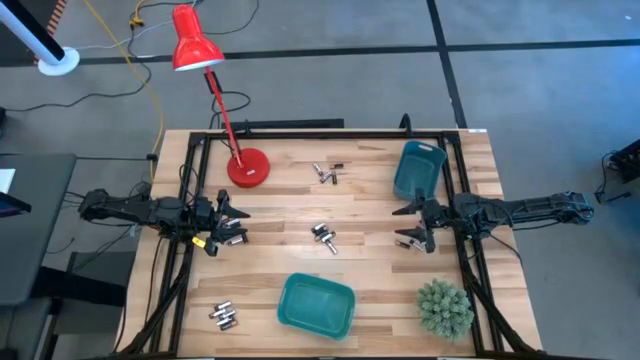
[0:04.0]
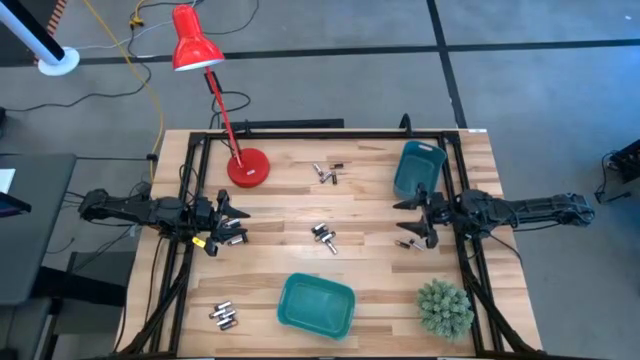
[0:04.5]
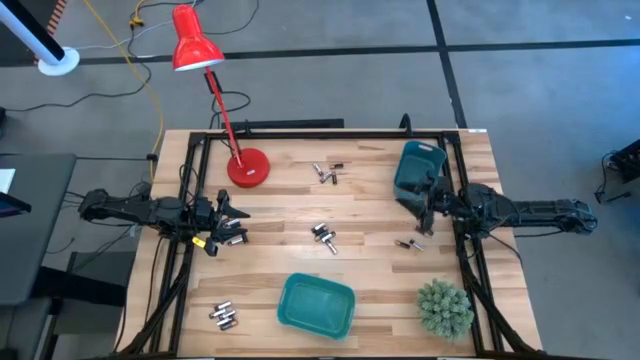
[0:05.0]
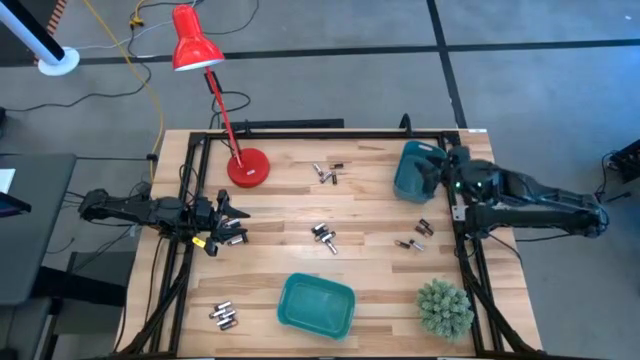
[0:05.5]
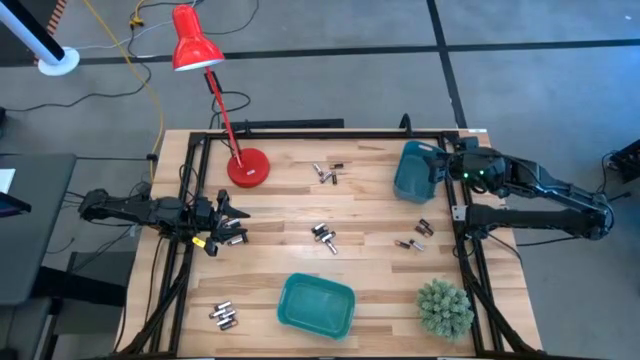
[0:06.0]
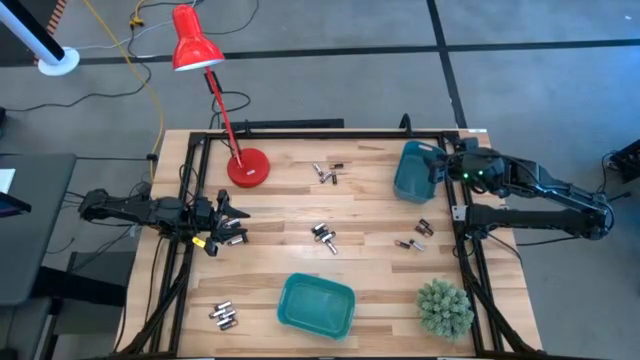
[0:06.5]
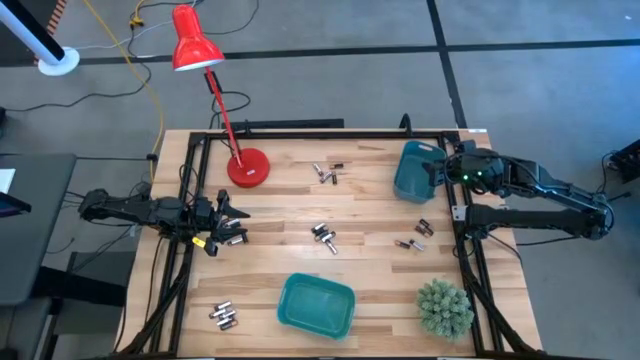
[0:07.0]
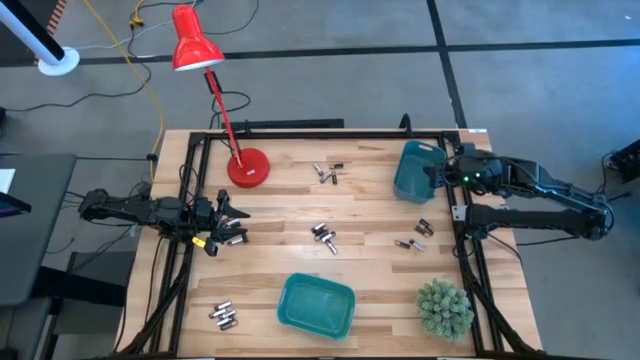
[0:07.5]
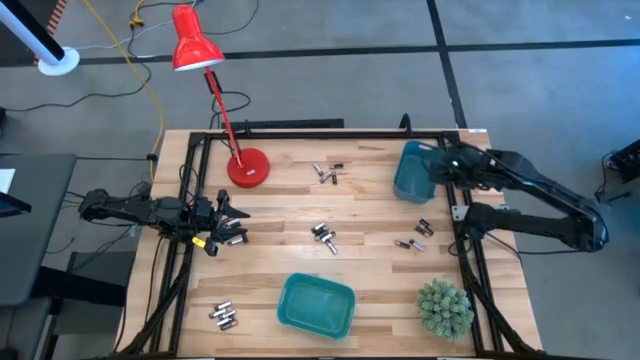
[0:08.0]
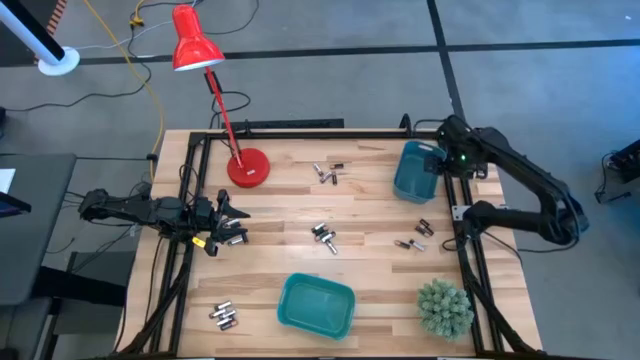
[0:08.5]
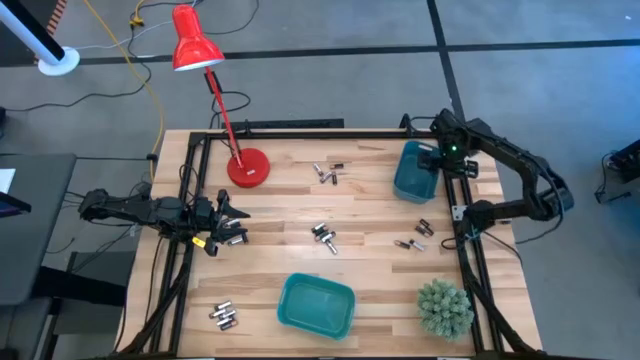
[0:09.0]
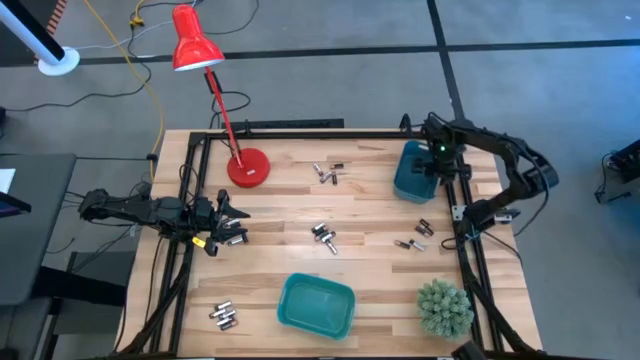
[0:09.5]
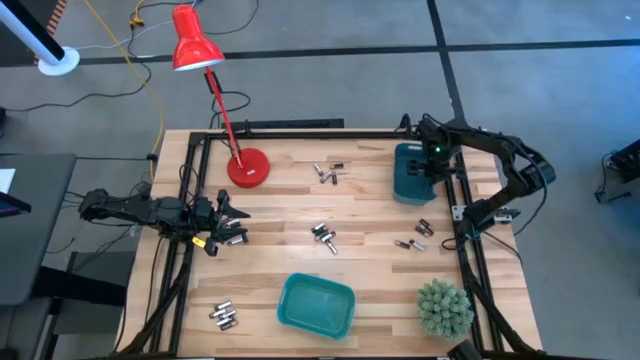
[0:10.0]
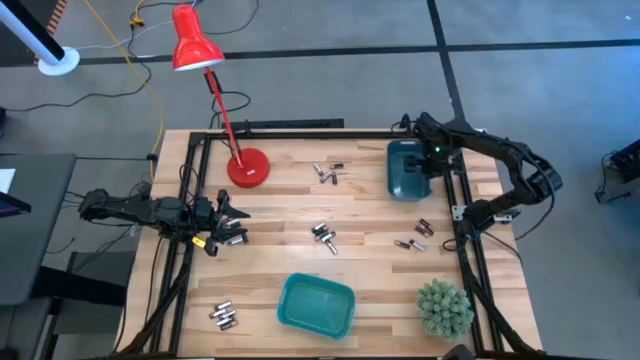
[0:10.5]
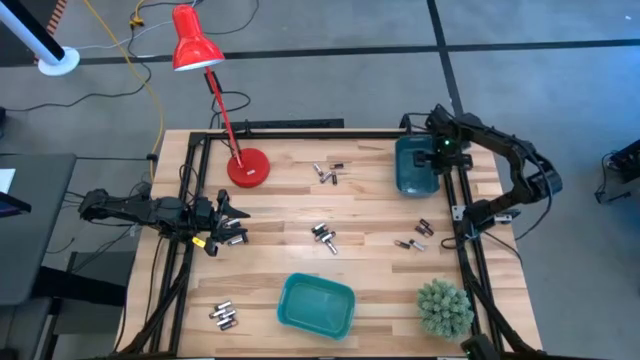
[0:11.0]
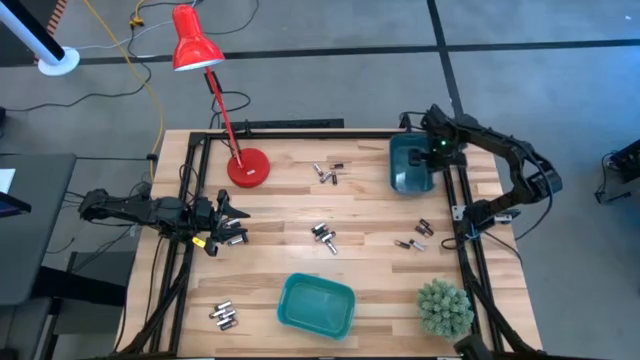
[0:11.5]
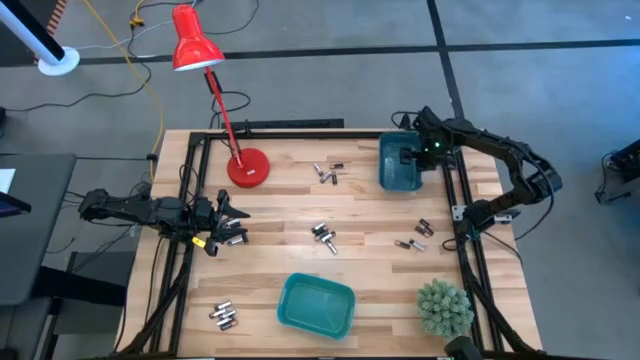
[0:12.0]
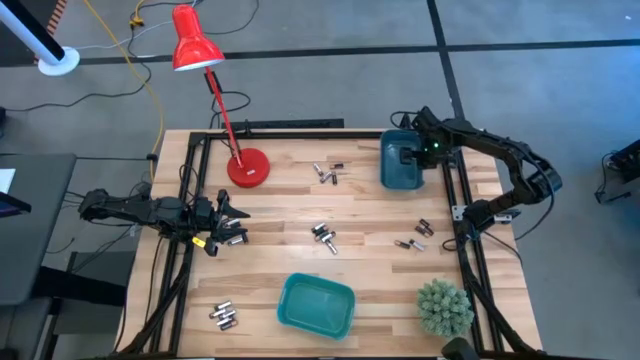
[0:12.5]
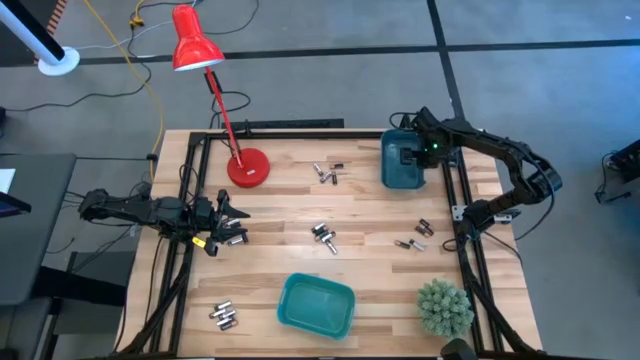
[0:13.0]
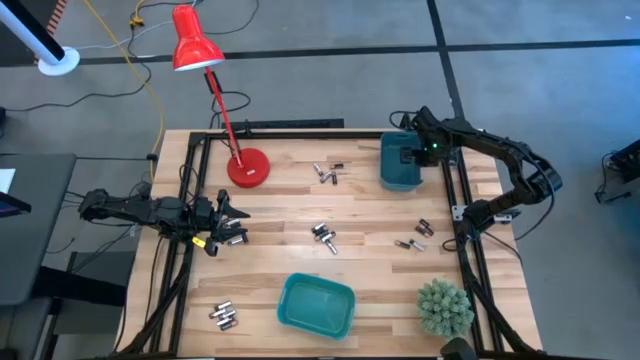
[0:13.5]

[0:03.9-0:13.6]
Task: Sort batteries
Adjust the blue bin on the table

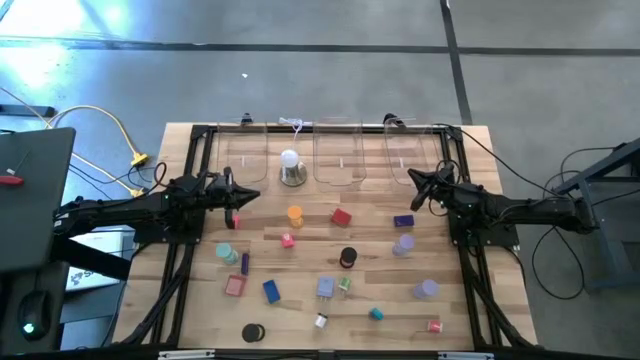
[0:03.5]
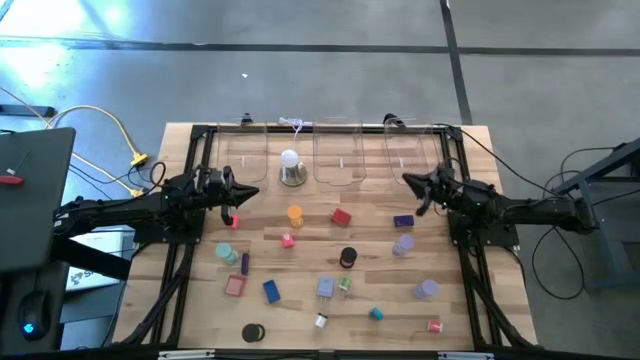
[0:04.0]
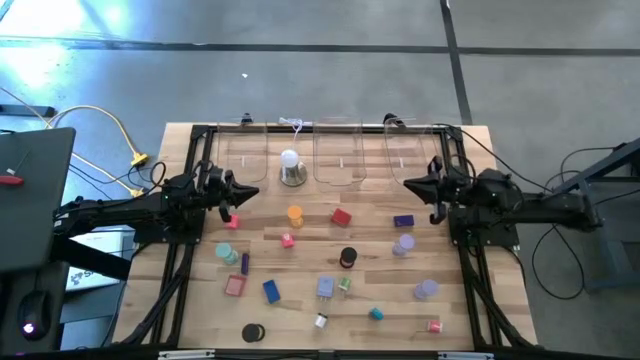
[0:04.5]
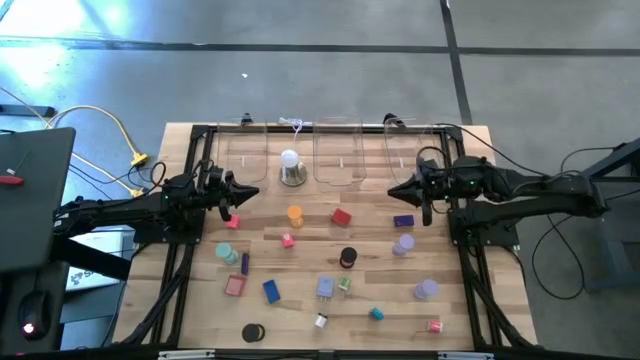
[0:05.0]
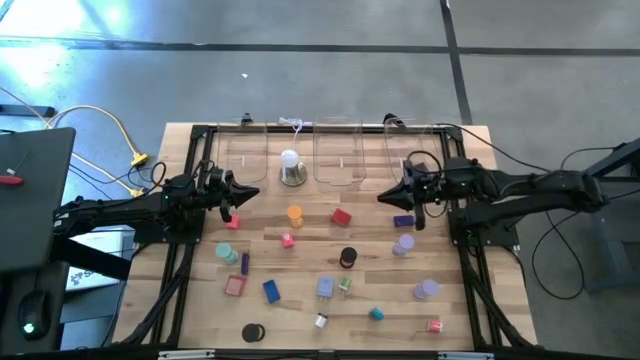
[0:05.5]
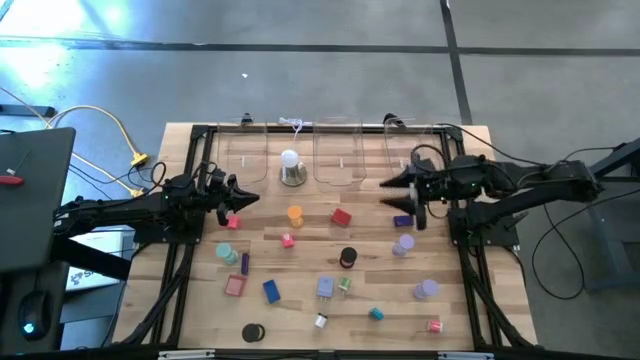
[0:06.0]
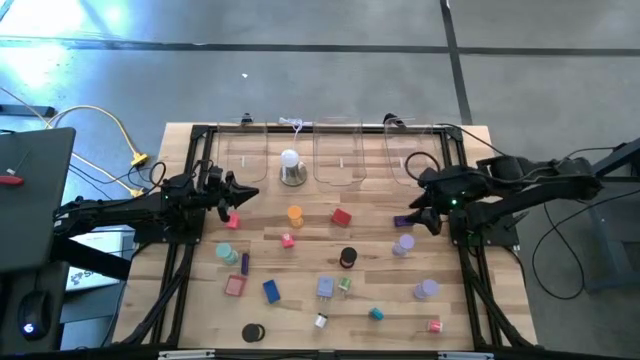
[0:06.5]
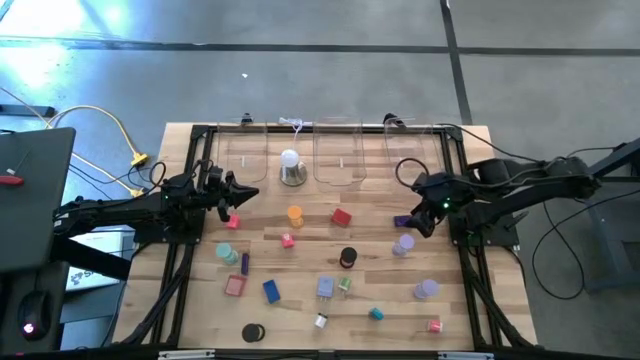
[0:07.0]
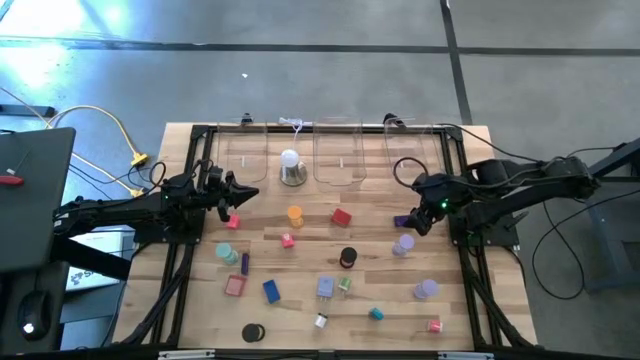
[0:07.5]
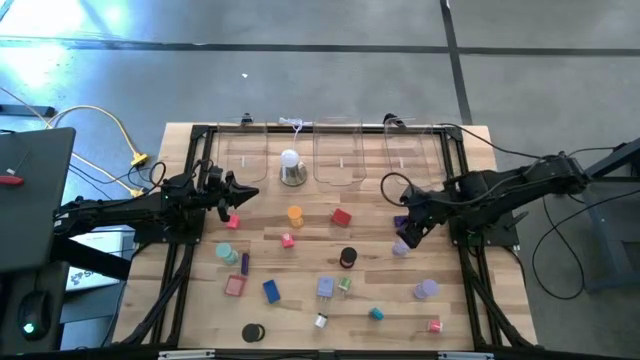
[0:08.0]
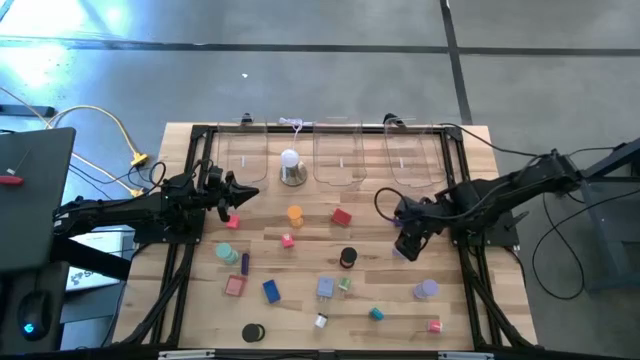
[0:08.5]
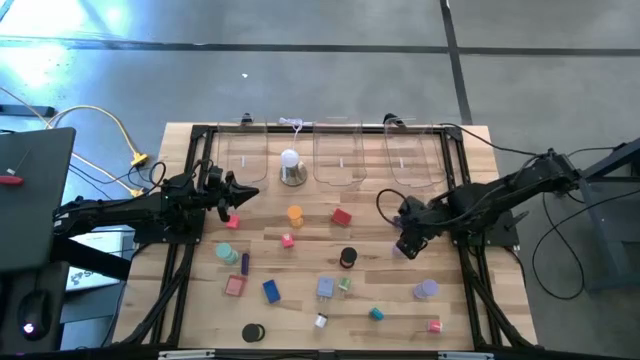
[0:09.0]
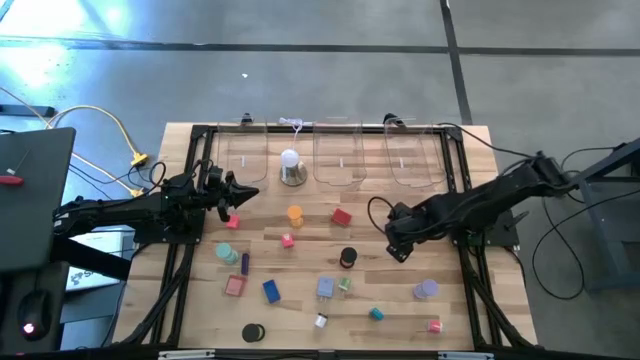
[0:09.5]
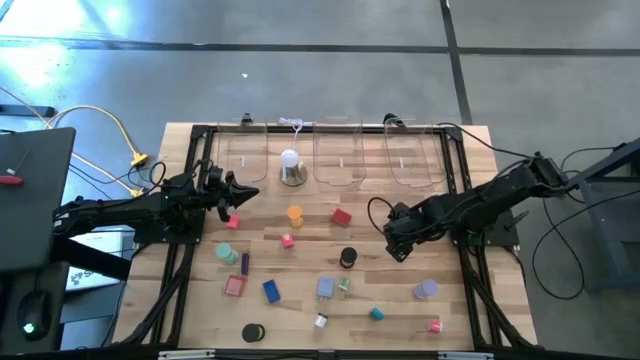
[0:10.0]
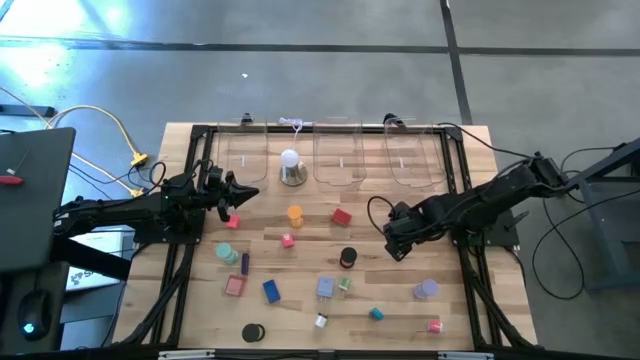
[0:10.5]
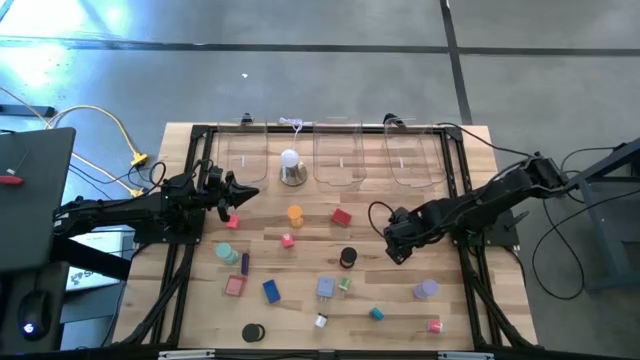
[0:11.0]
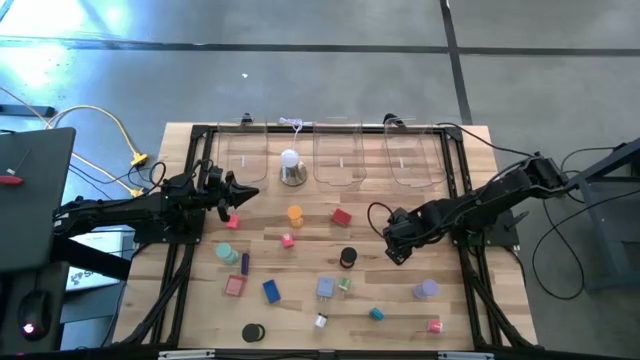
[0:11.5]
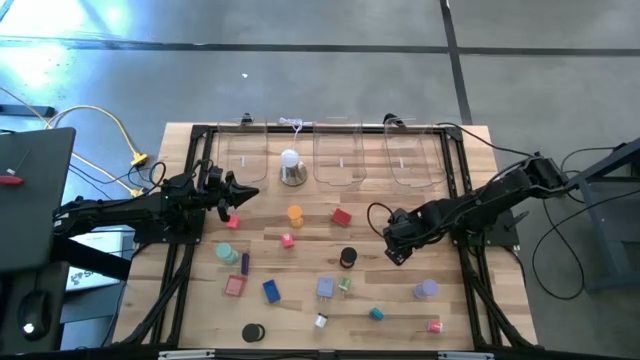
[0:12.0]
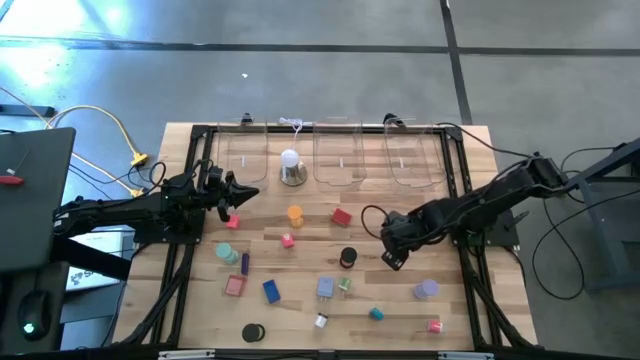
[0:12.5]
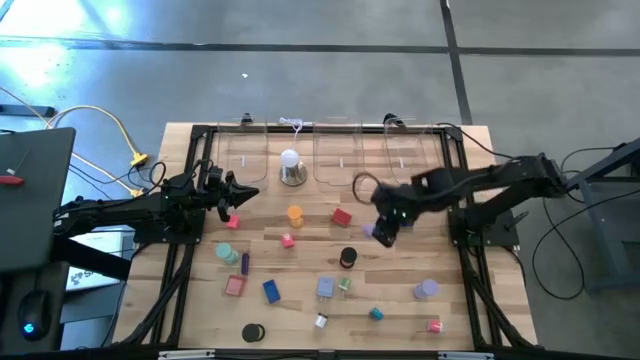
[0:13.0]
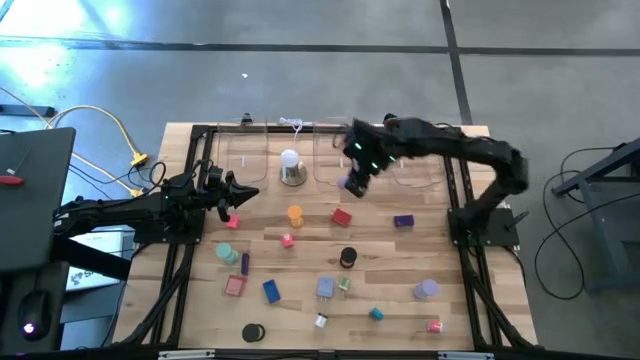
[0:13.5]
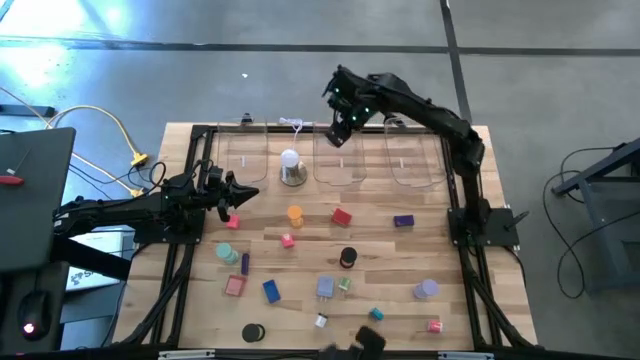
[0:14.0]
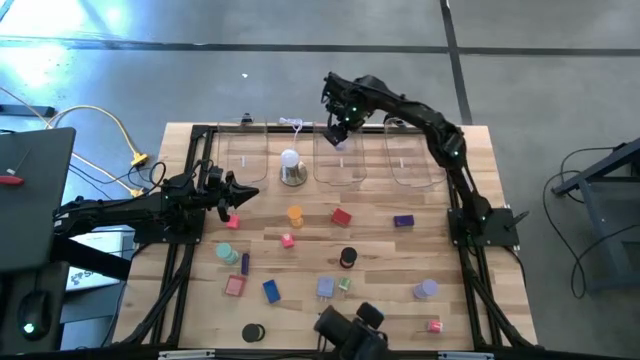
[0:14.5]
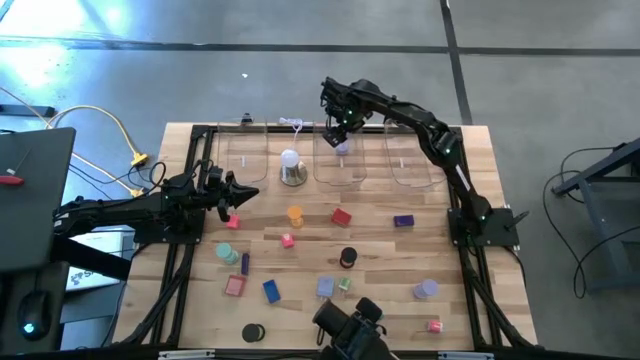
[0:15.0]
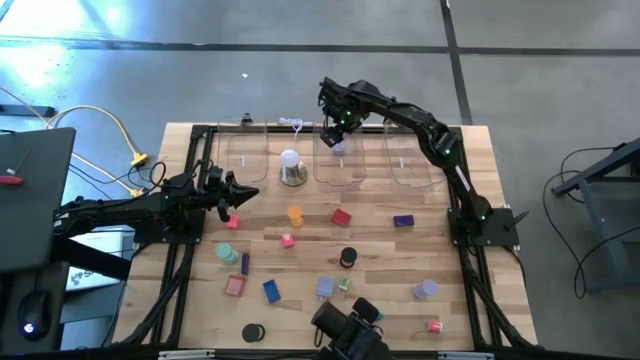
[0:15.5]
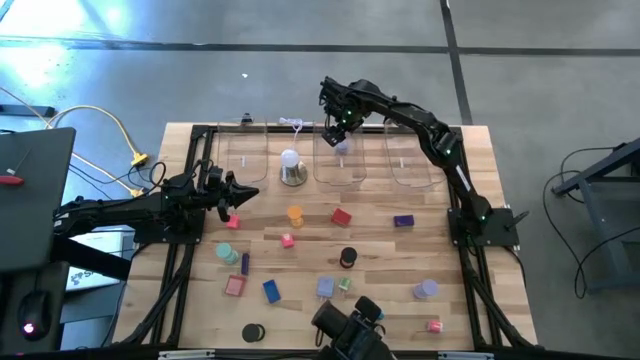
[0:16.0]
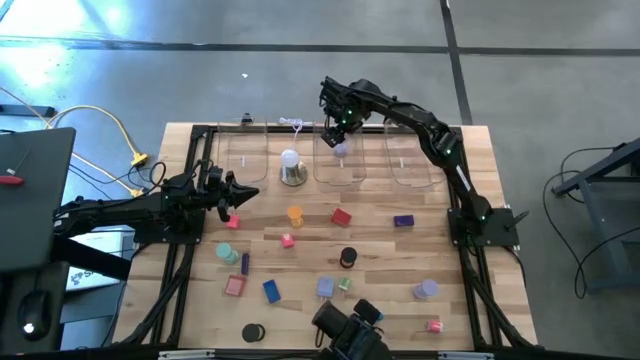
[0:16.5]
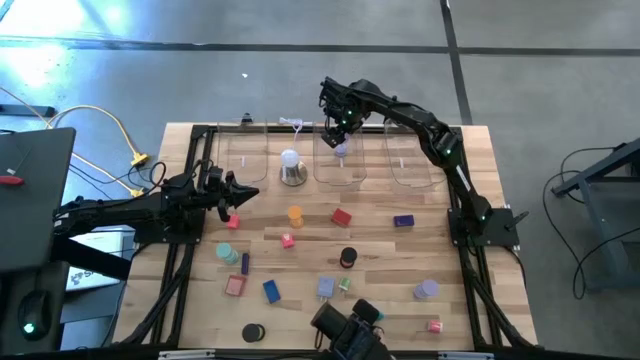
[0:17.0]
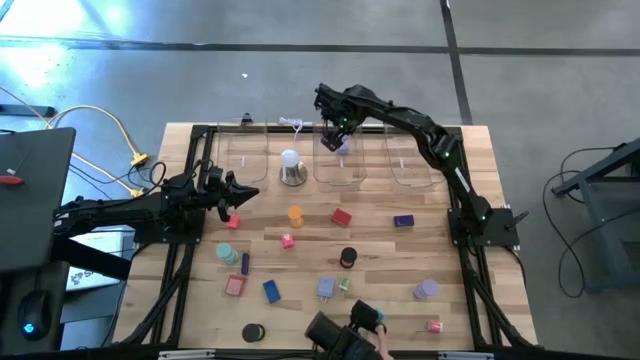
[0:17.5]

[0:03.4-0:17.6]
Task: Pick & Place Office items
Put the top violet hourglass into the middle transparent bin
